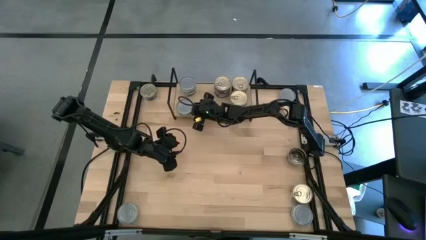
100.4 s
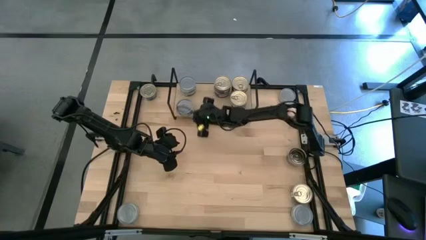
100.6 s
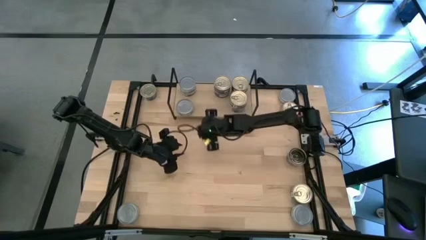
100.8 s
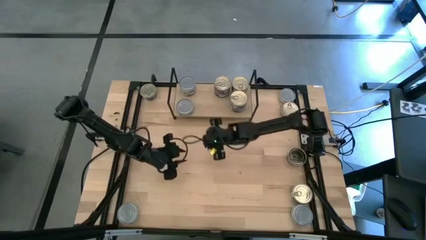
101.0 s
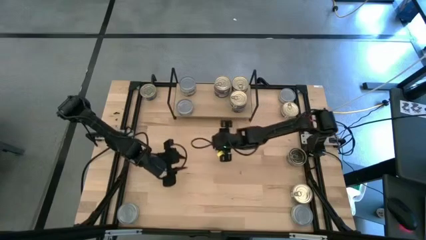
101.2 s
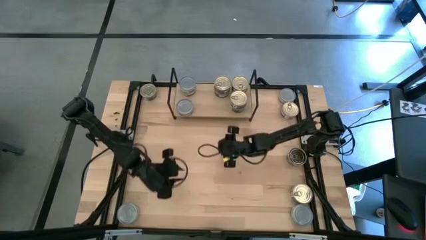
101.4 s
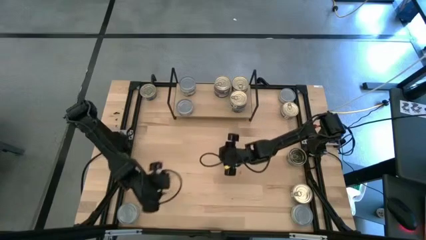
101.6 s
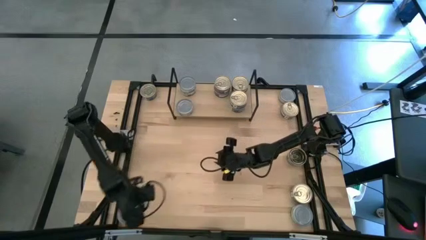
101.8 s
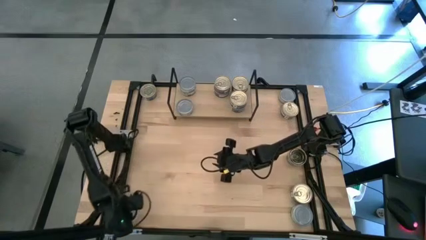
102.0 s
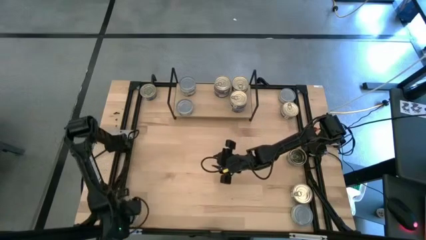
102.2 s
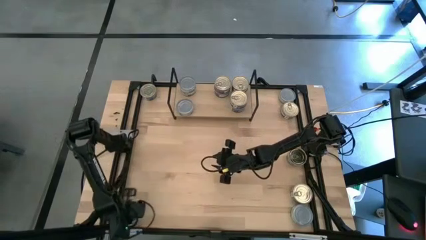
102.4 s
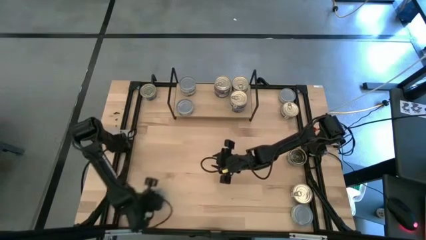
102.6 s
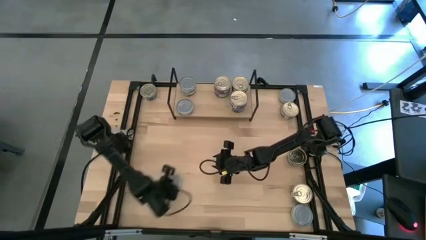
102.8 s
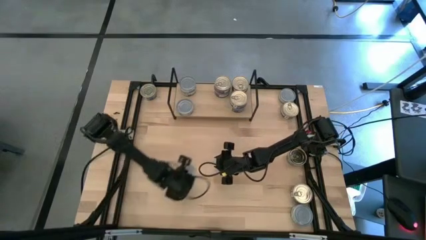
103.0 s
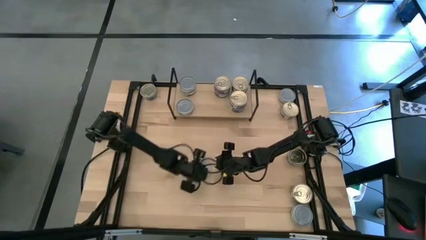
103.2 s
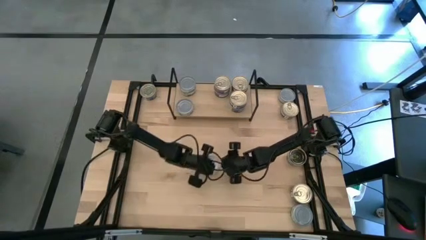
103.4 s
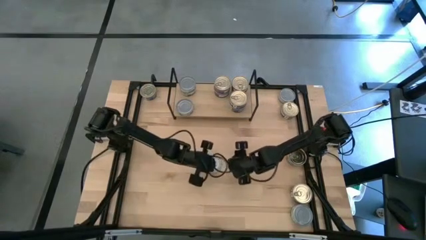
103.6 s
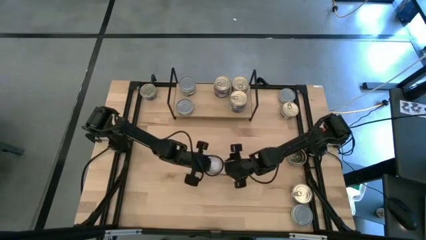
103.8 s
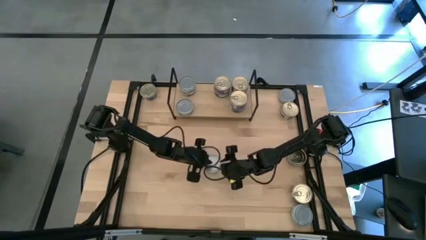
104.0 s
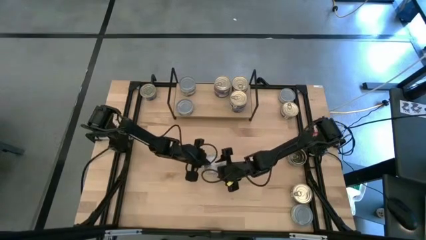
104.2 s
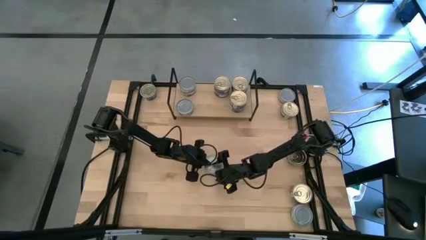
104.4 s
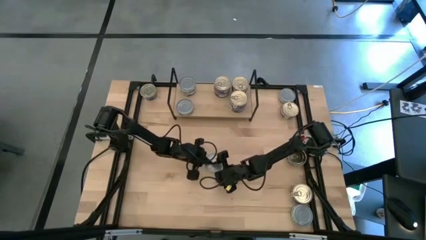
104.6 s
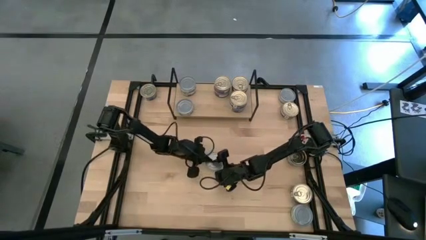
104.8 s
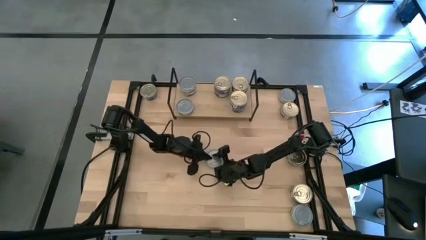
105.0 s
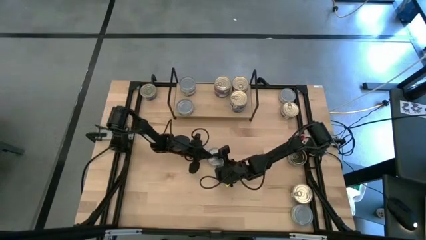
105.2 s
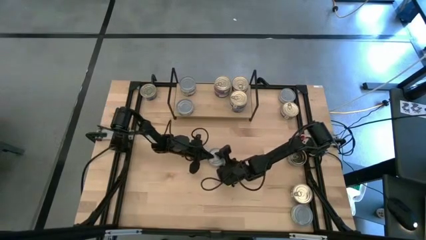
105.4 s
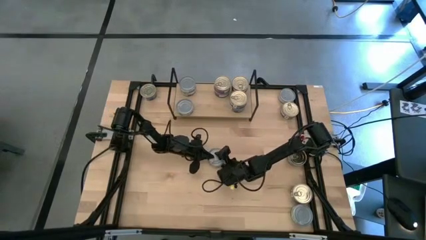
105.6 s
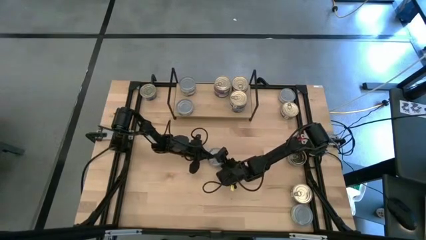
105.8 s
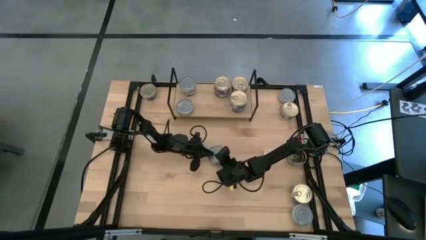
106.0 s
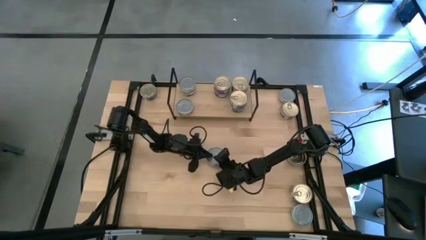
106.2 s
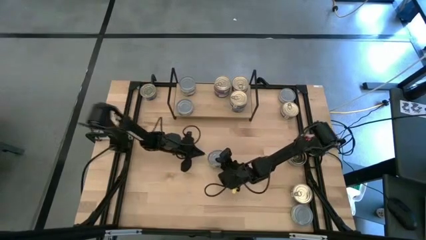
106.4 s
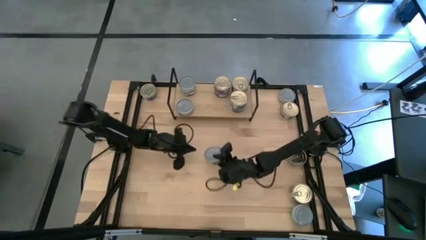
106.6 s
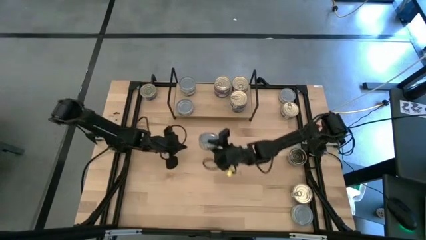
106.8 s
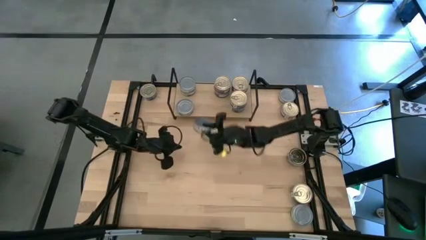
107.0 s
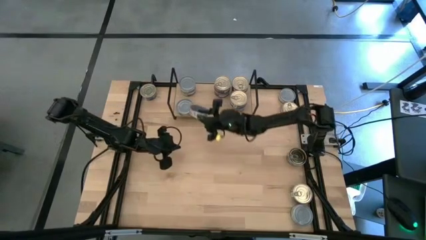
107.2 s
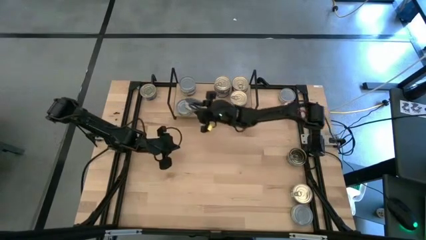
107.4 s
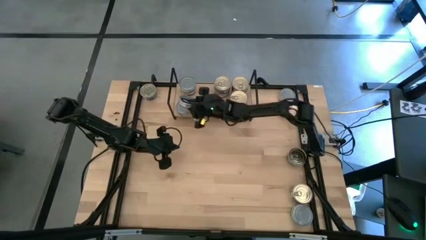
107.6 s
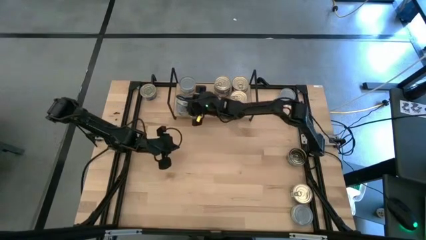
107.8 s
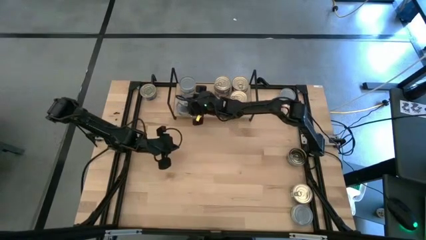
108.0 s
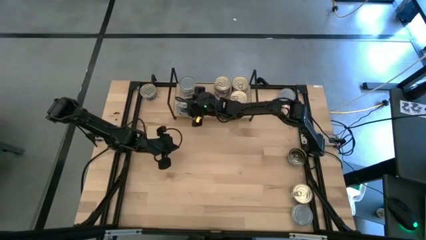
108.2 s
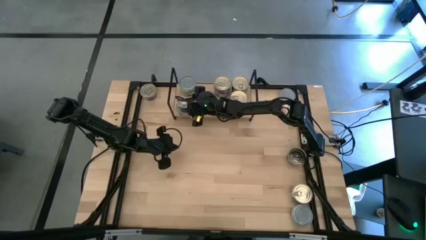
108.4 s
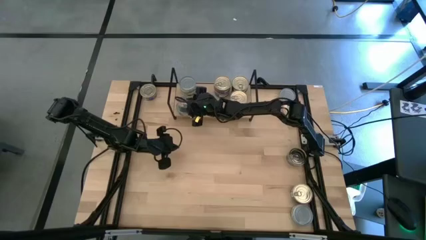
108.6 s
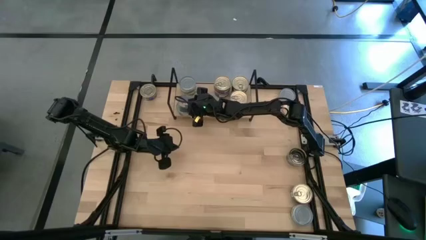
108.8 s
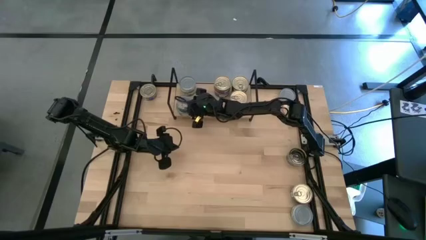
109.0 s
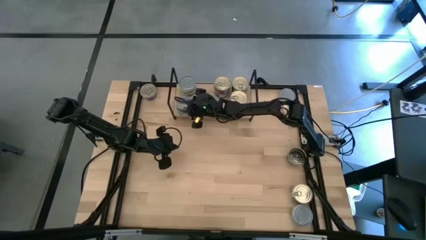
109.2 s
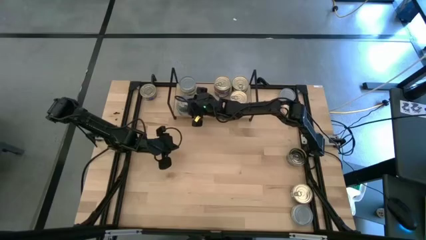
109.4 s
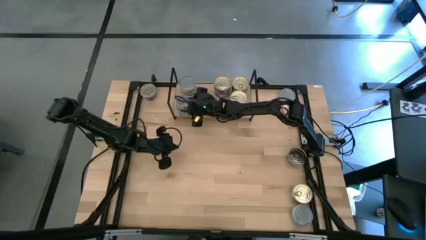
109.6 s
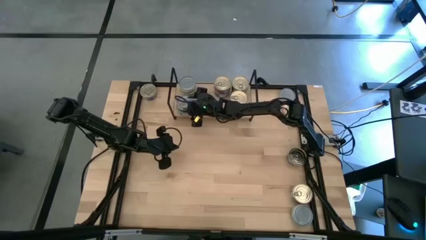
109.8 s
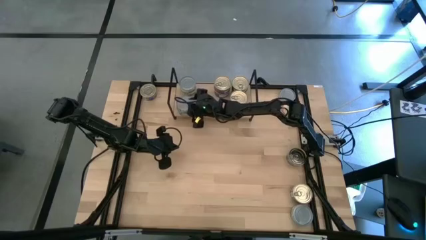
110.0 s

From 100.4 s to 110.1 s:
Task: Stack canned seafood by type on shelf
Stack the green and white tuna can on top of the green and white tuna can on the shelf

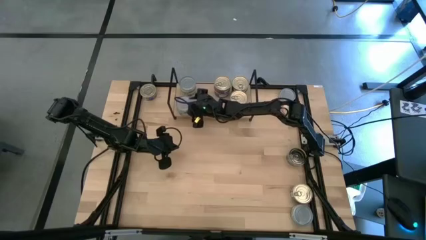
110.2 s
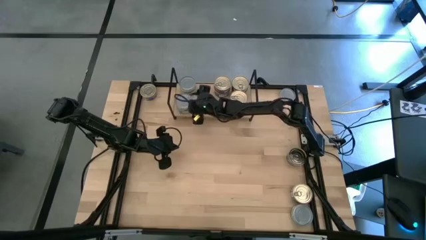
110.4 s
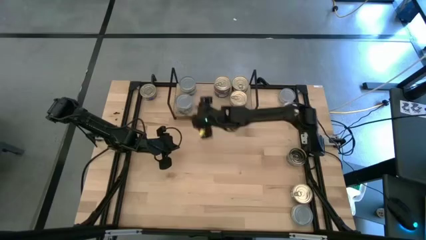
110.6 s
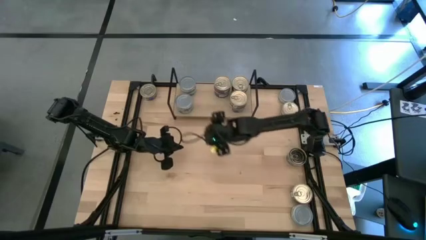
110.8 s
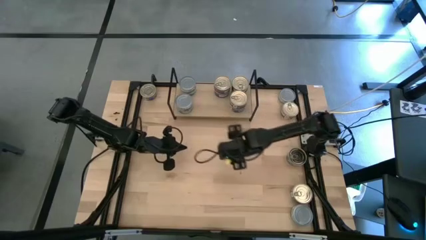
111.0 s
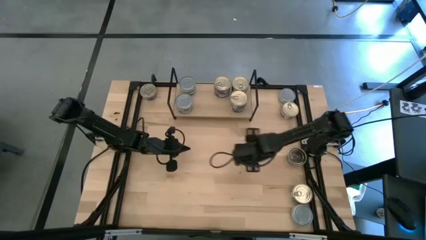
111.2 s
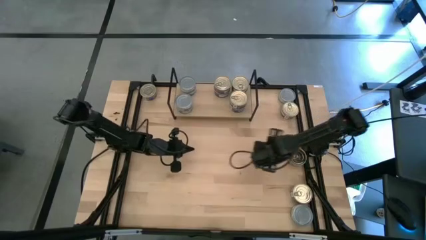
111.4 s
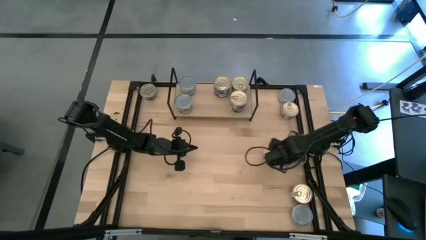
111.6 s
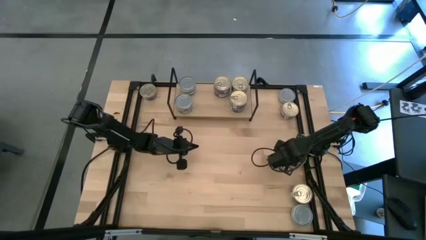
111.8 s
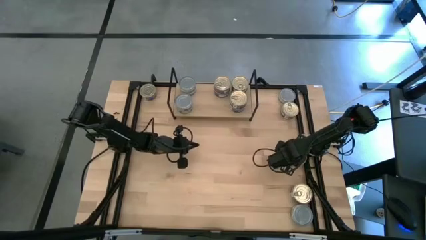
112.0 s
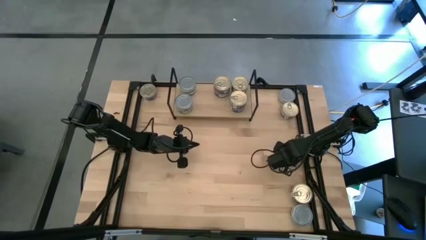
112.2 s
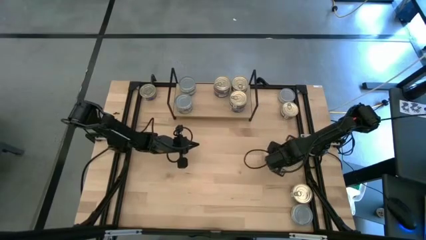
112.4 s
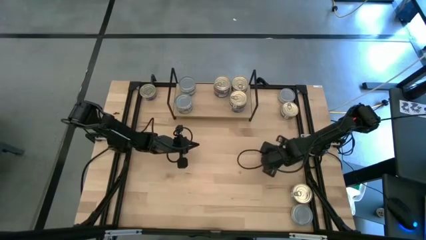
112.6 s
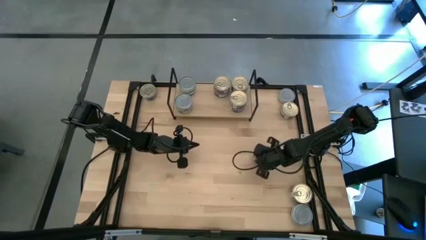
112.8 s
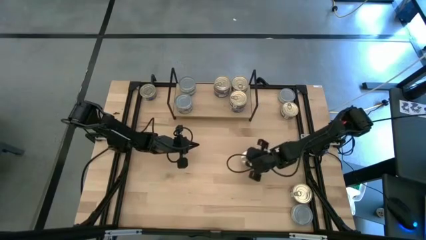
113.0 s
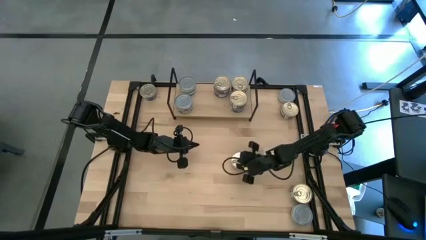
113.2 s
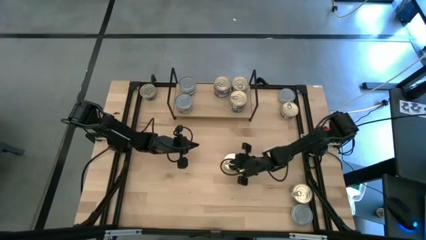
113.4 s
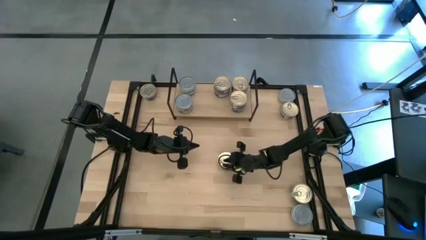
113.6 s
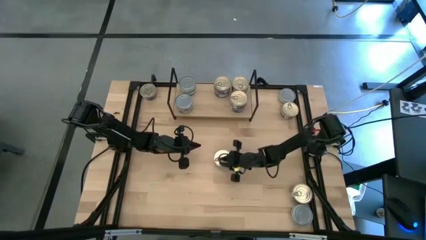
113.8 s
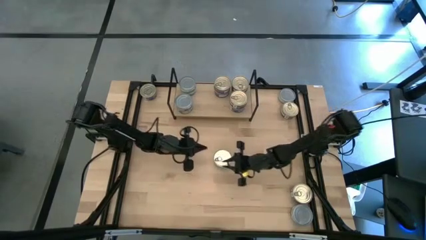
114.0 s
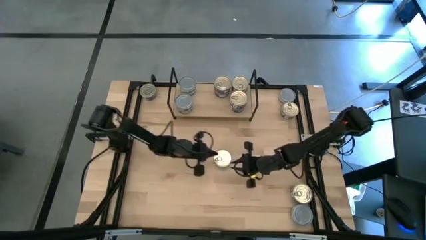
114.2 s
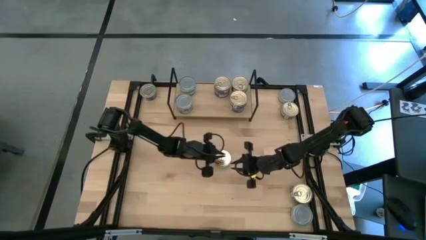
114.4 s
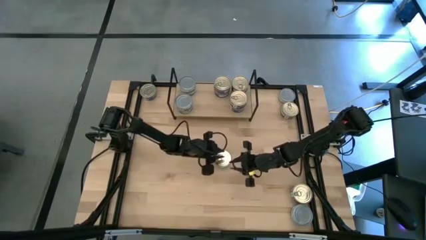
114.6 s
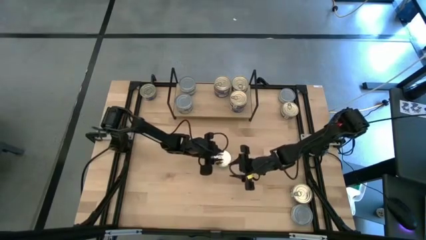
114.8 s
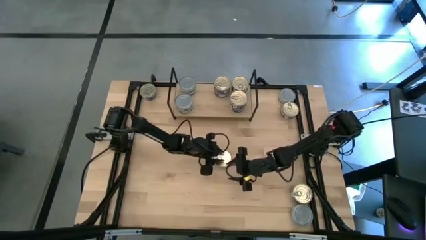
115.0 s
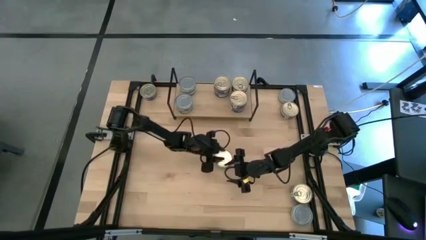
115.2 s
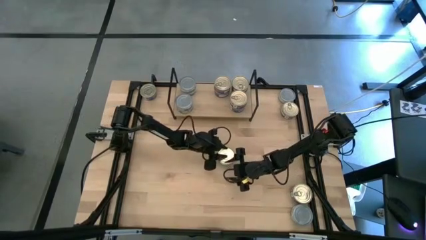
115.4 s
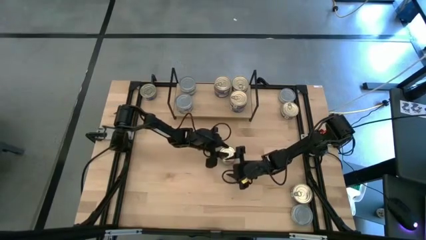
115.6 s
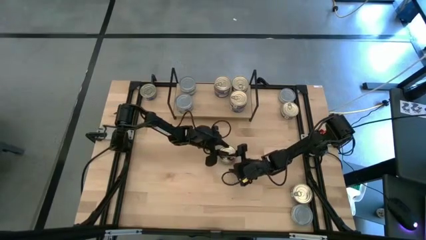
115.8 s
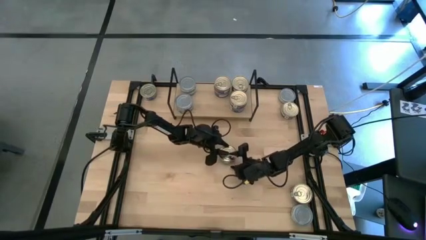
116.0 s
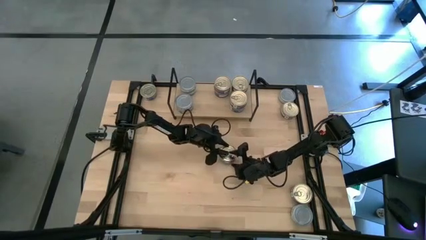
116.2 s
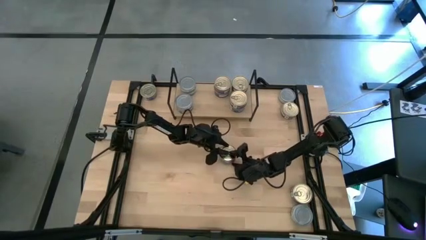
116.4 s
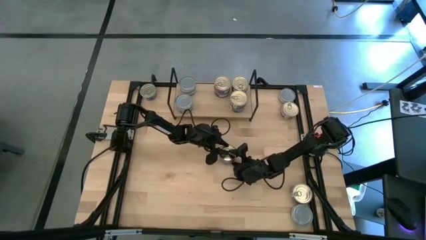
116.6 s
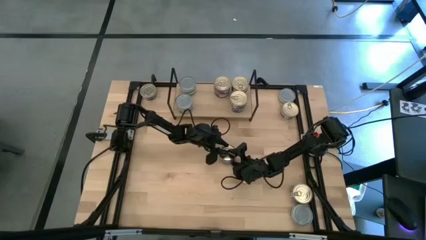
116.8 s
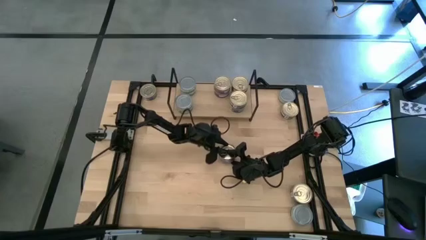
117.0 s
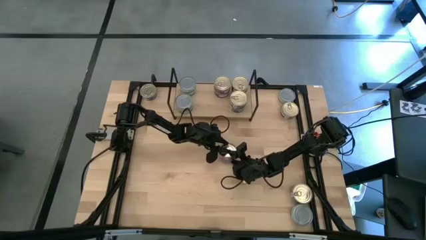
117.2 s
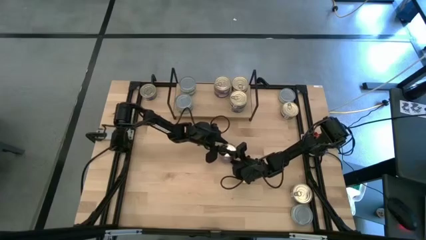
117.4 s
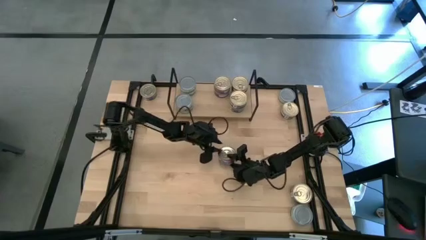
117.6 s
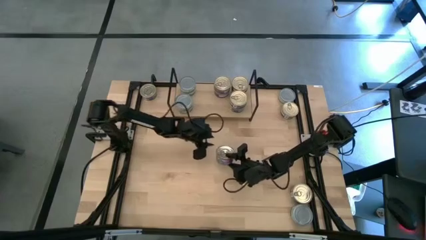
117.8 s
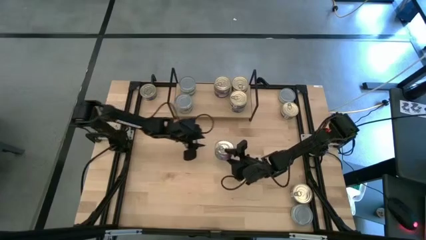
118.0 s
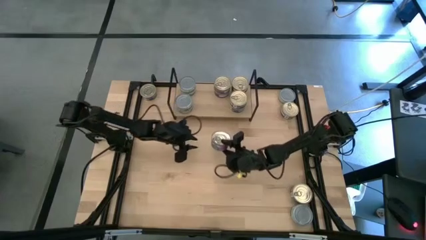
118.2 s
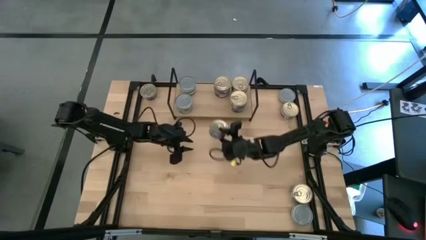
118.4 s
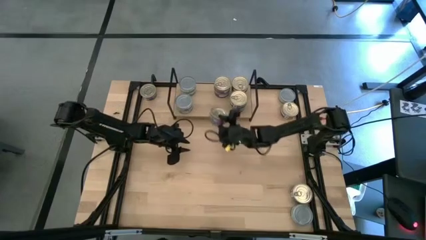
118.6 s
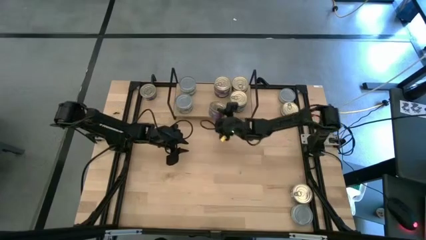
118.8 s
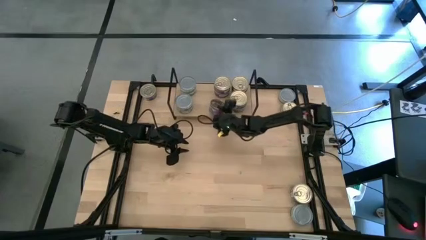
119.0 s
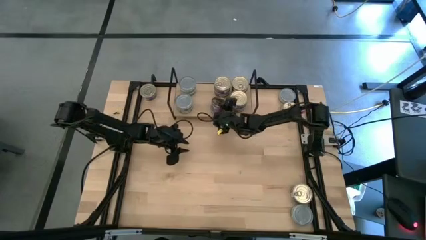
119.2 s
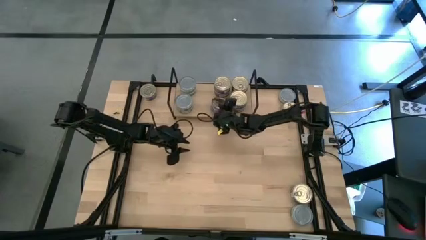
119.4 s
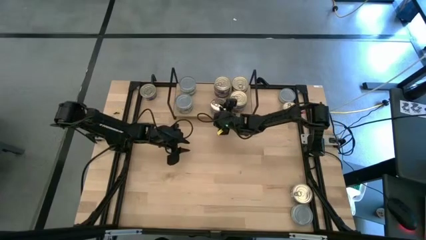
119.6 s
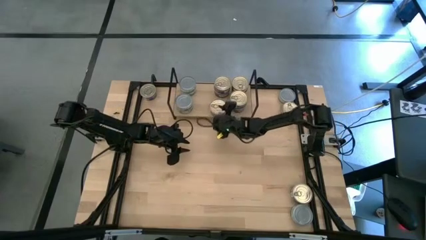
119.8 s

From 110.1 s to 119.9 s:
Put the blue and pink tuna can on the shelf aligned with the other blue and pink tuna can
